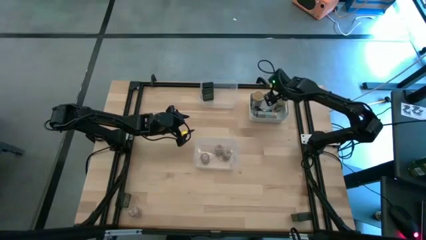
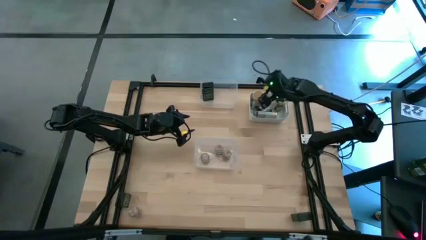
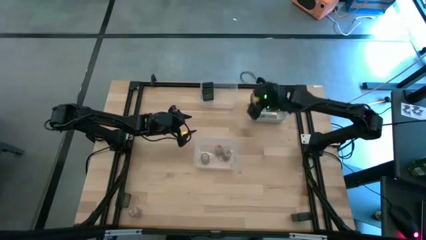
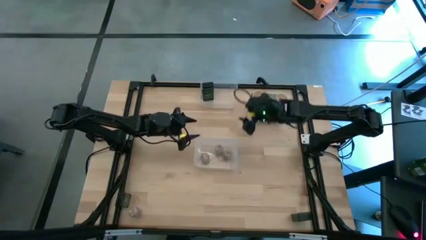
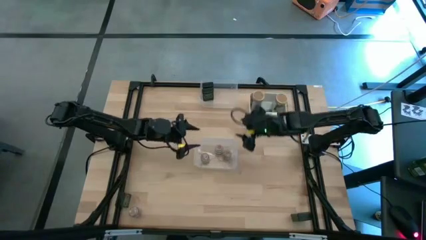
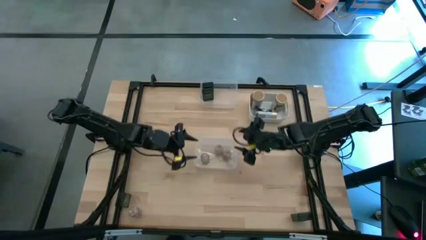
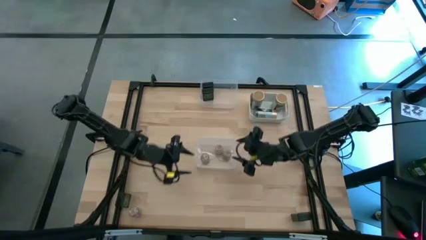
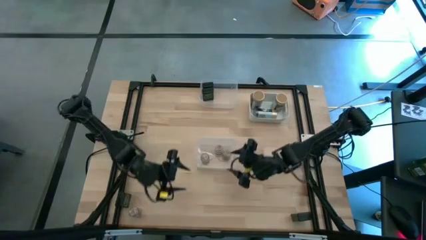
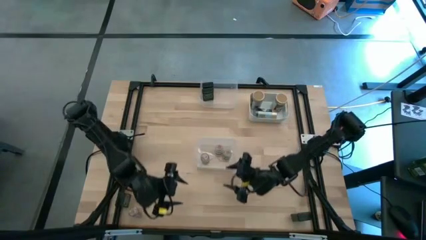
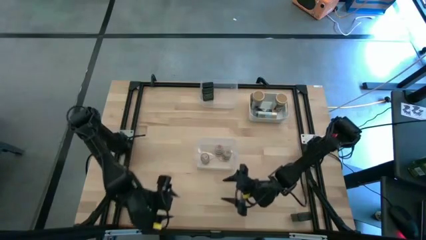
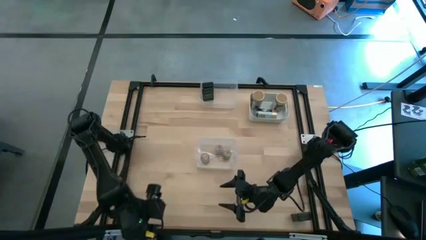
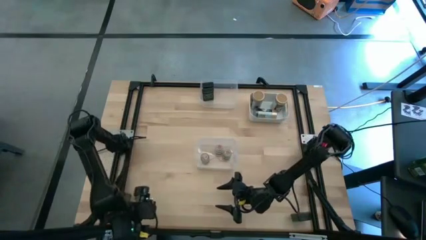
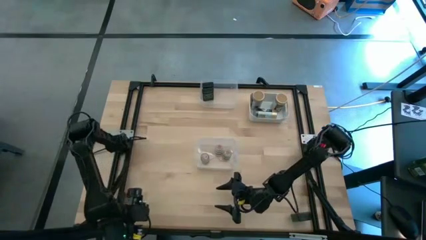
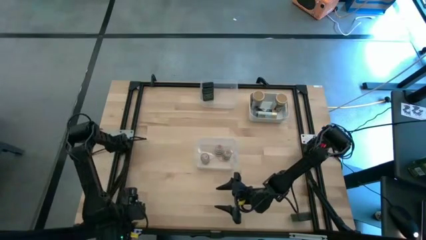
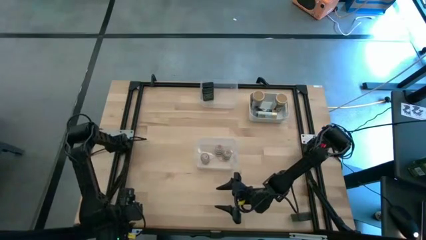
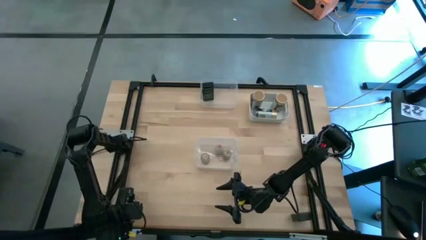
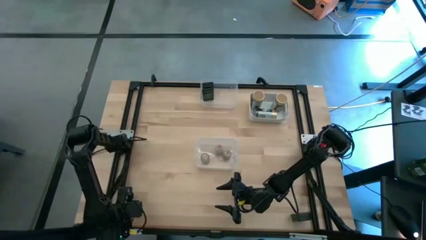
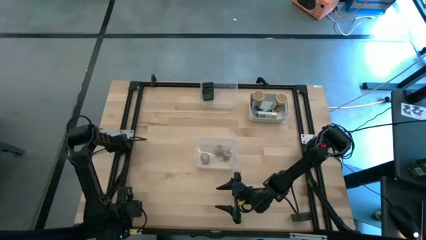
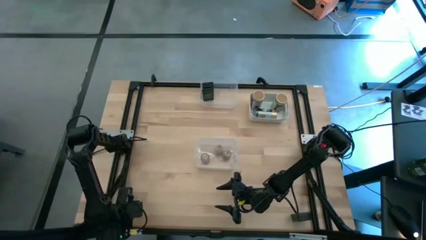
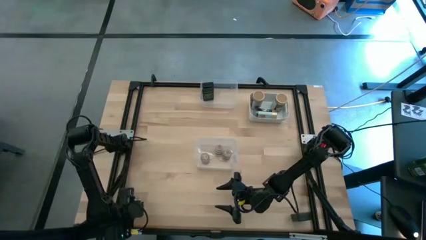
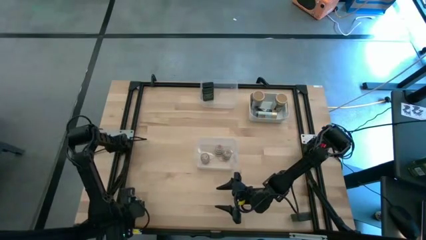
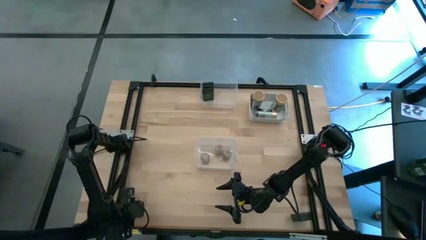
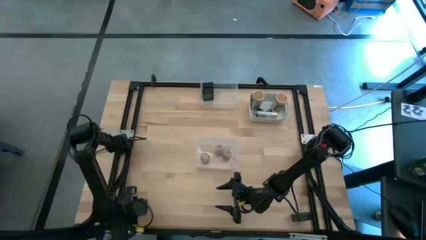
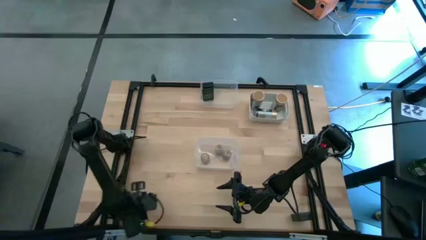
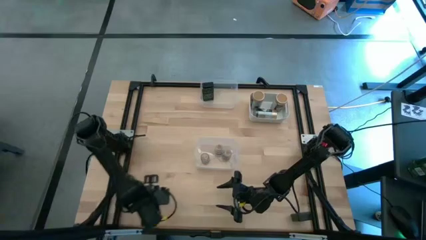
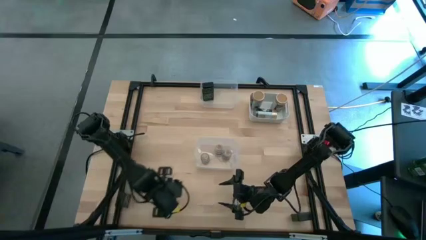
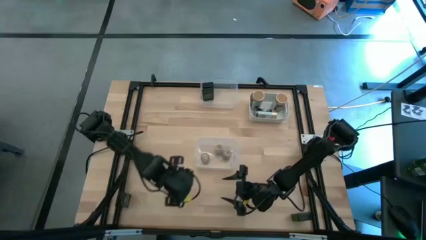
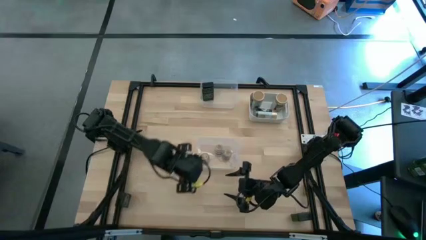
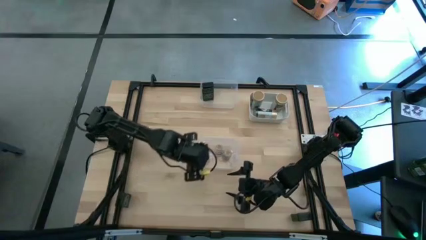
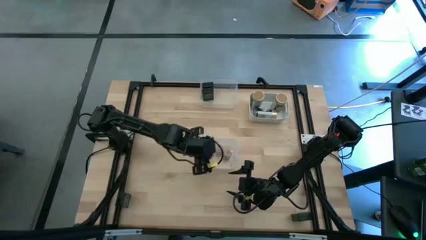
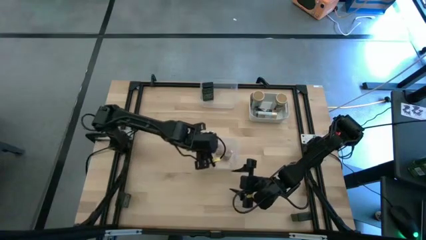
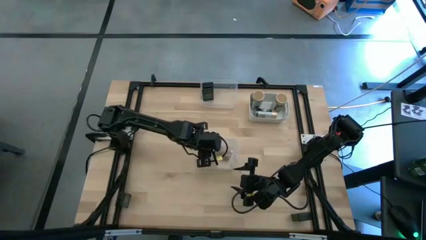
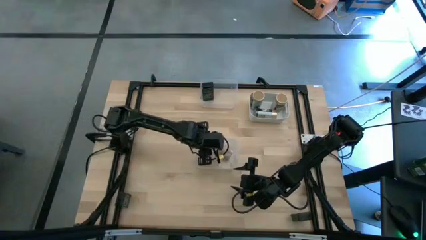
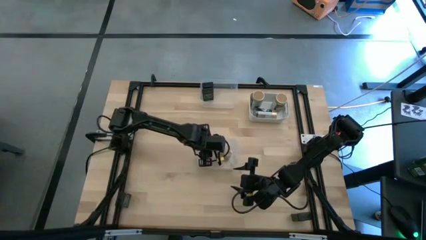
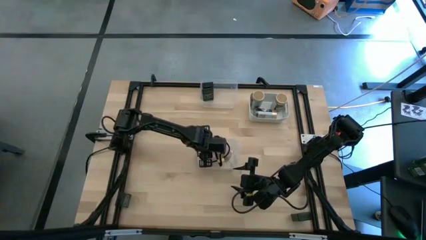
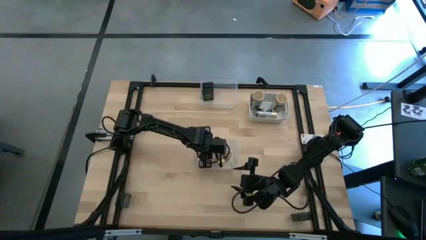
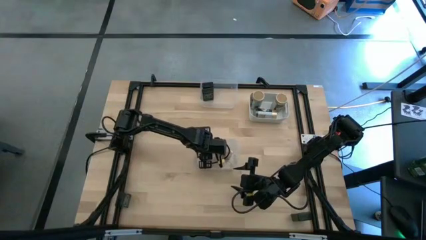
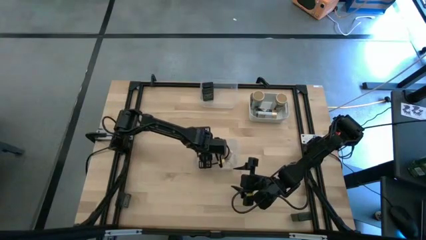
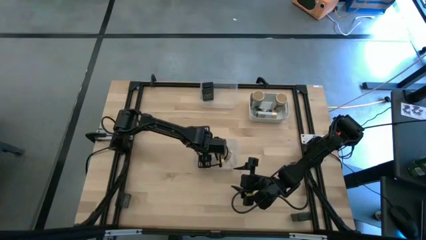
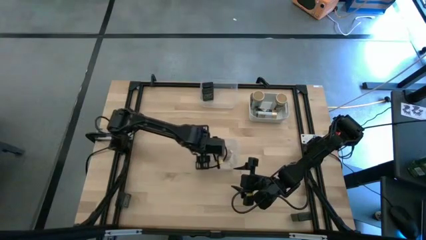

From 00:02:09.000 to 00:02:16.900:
Task: Sort spices by type
Put the transparent seasoning bottle into the bottom transparent bin

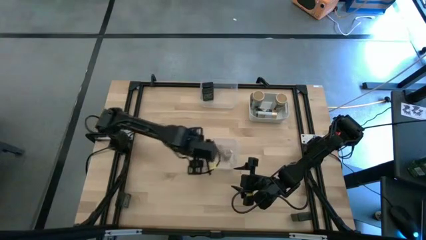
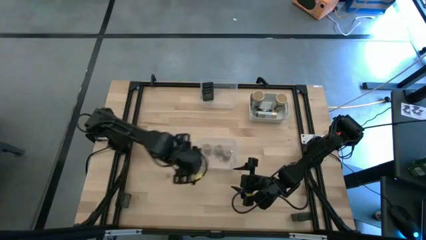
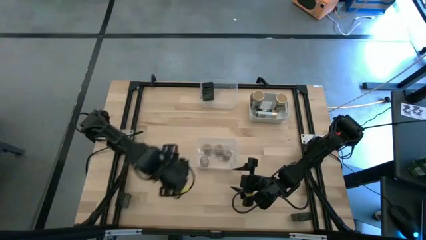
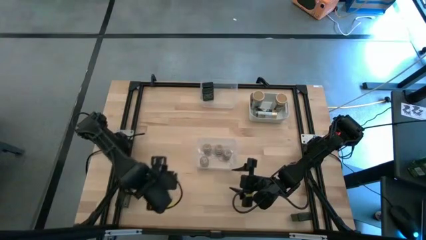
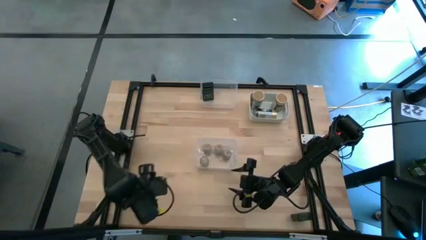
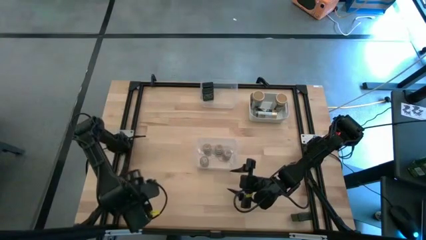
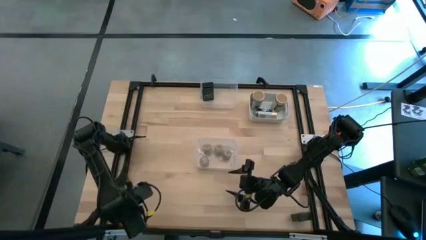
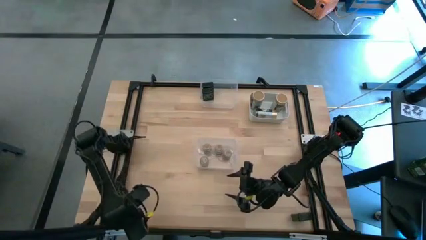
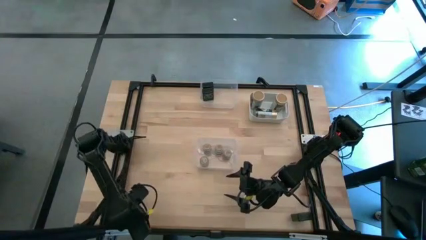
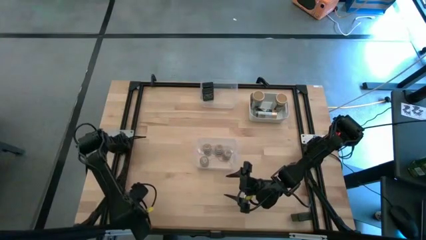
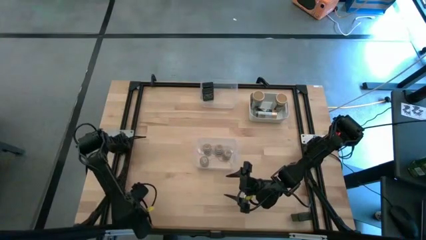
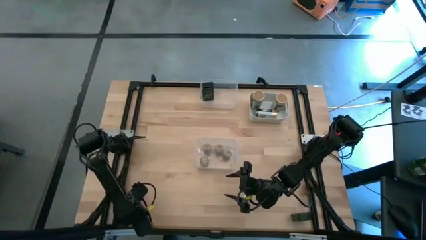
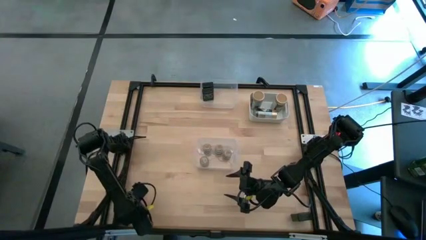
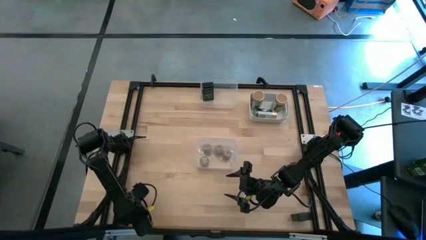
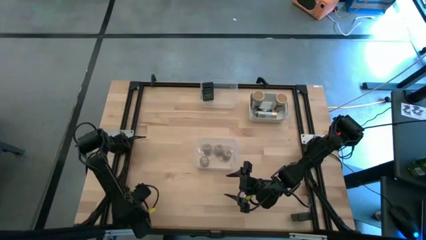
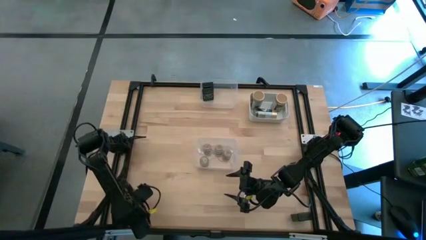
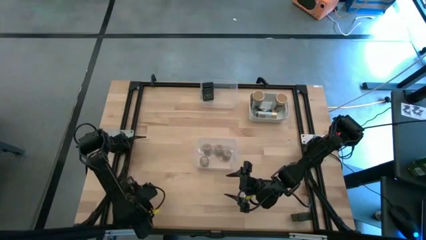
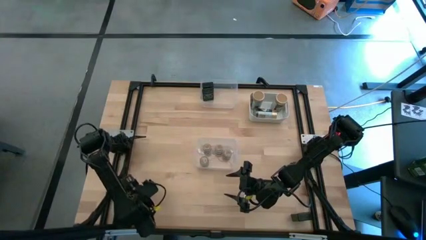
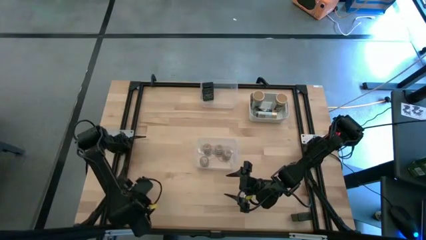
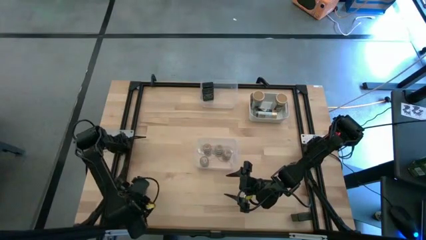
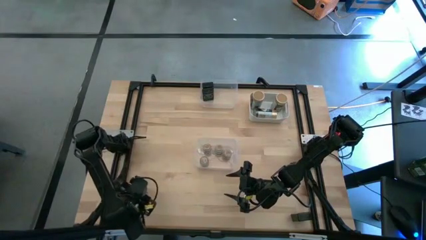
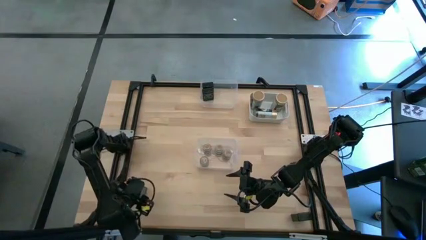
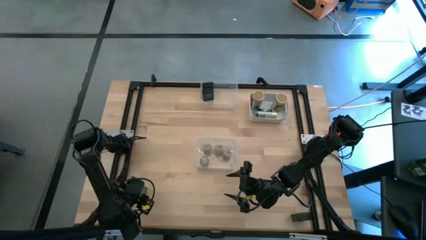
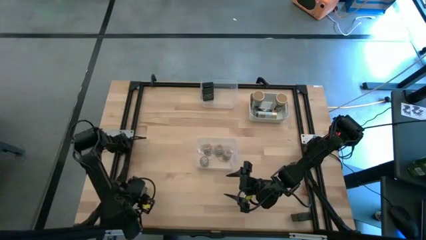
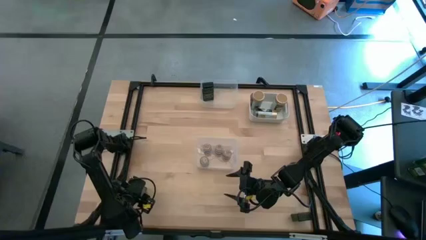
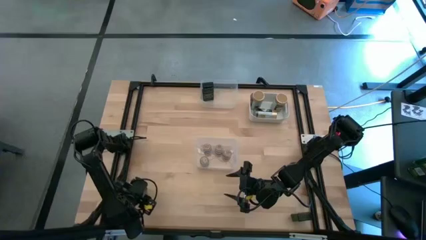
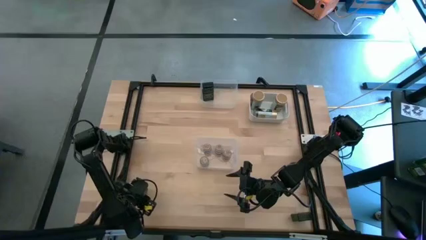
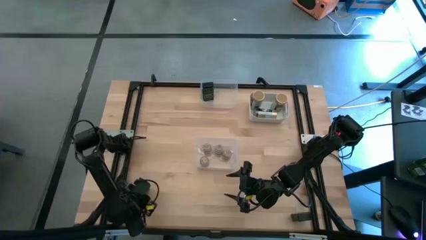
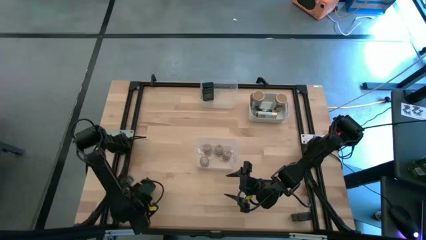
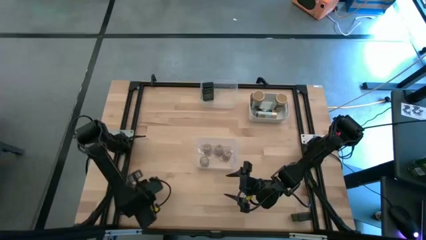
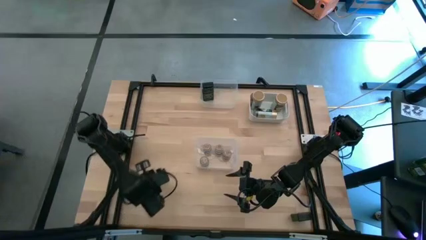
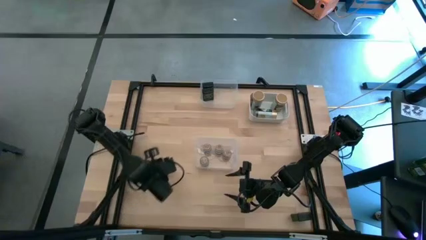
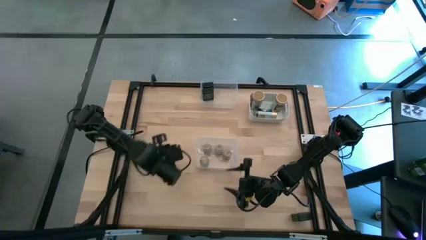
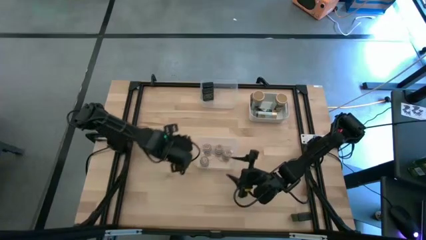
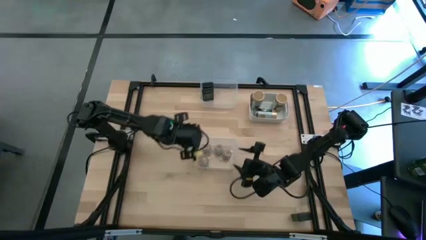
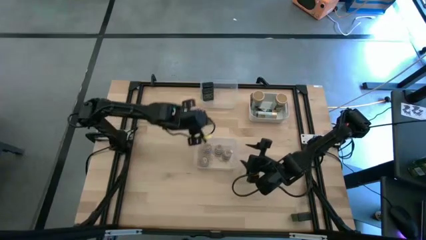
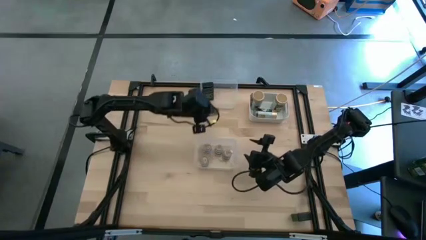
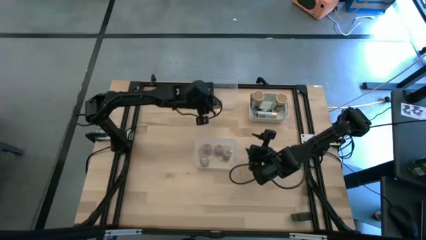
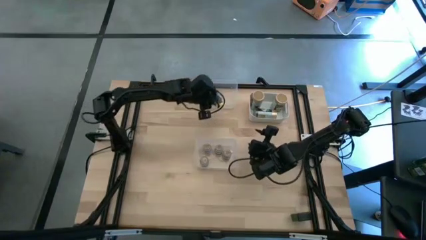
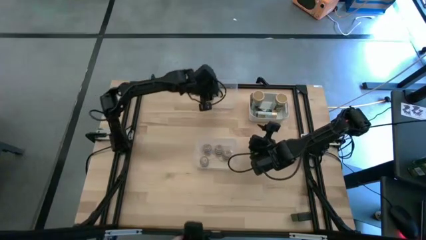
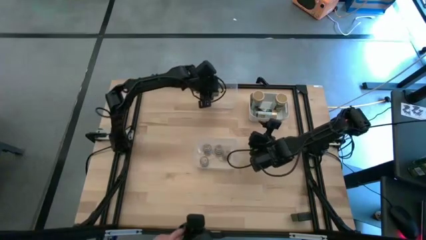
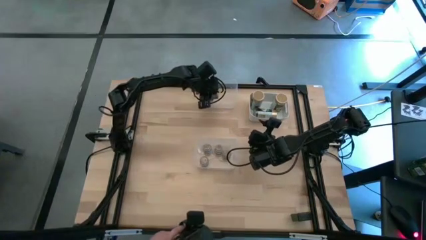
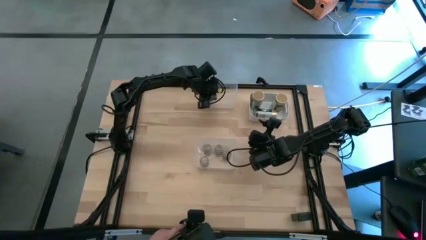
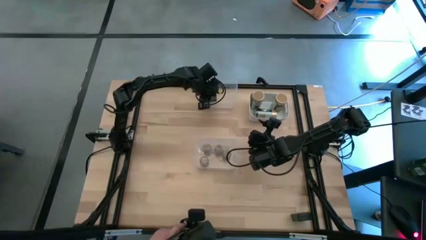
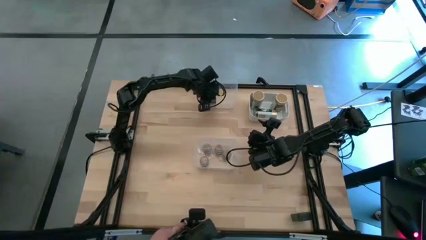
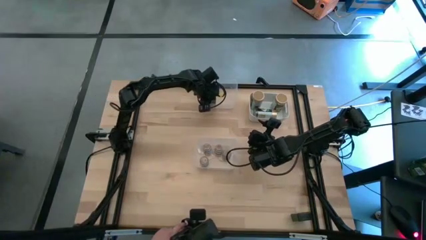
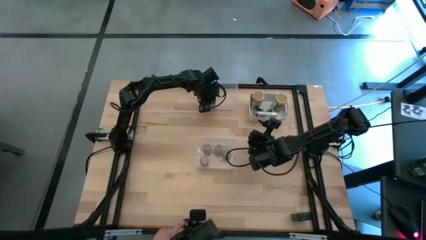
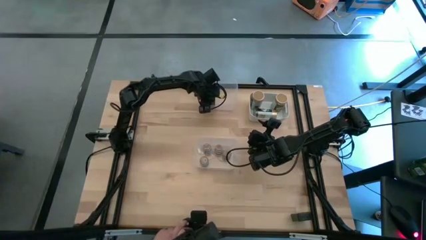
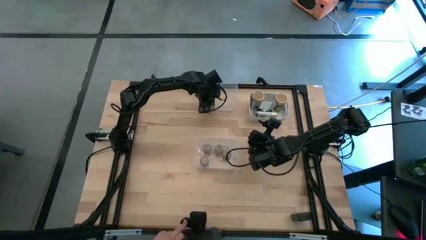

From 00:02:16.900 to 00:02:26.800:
Put the left black seasoning can into the top transparent bin
